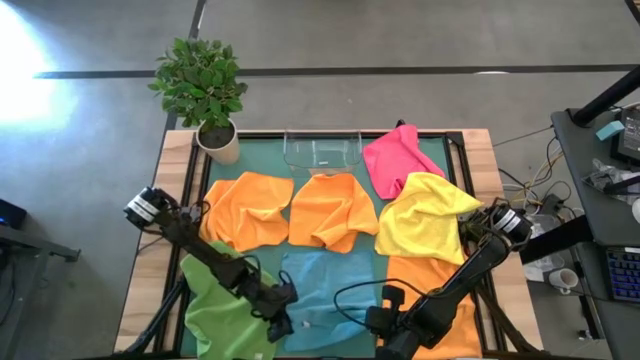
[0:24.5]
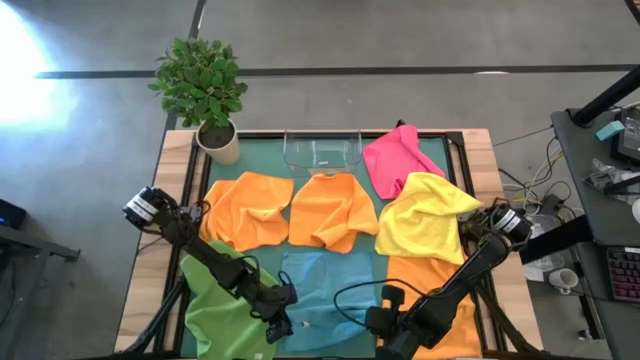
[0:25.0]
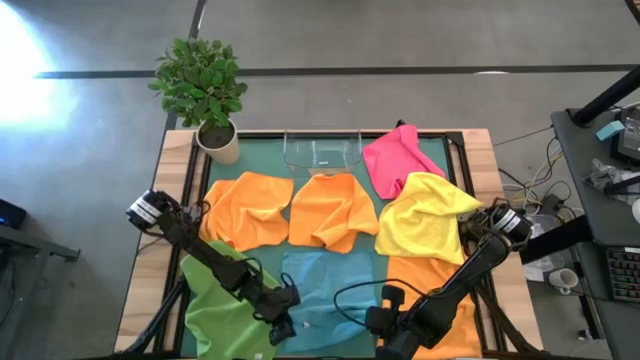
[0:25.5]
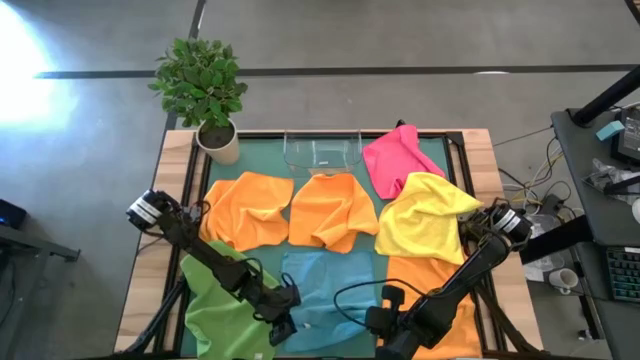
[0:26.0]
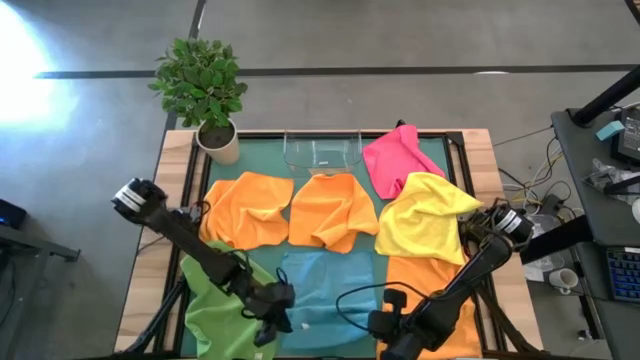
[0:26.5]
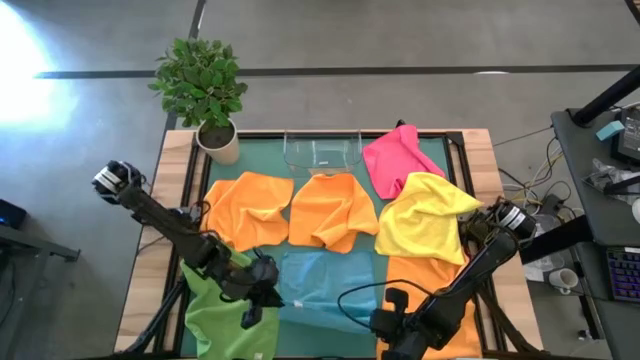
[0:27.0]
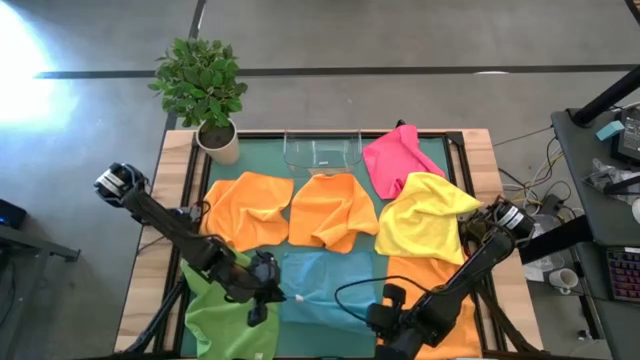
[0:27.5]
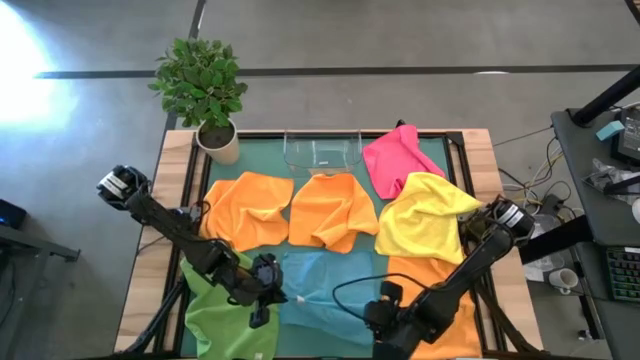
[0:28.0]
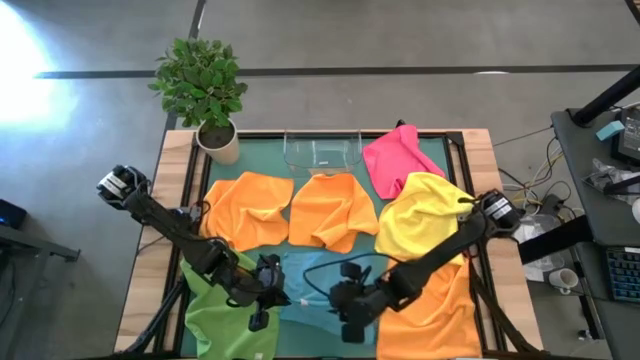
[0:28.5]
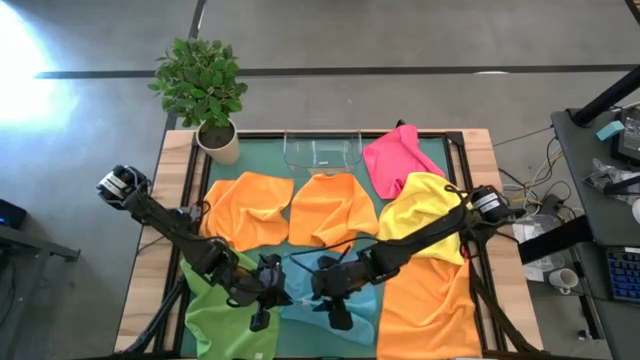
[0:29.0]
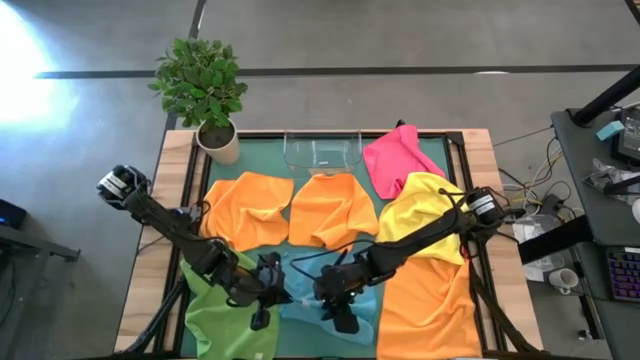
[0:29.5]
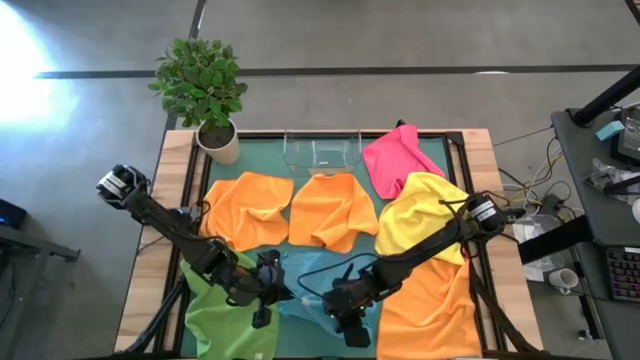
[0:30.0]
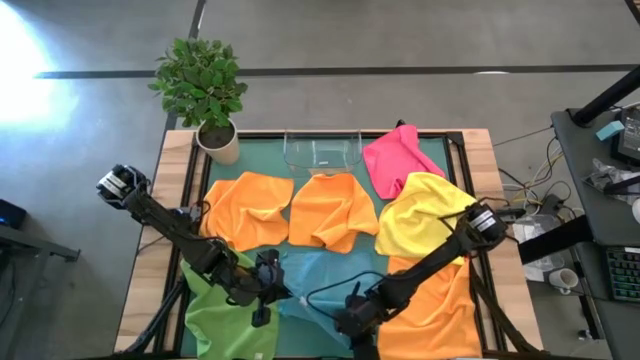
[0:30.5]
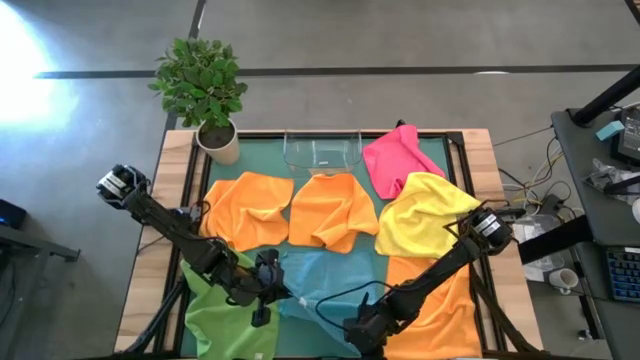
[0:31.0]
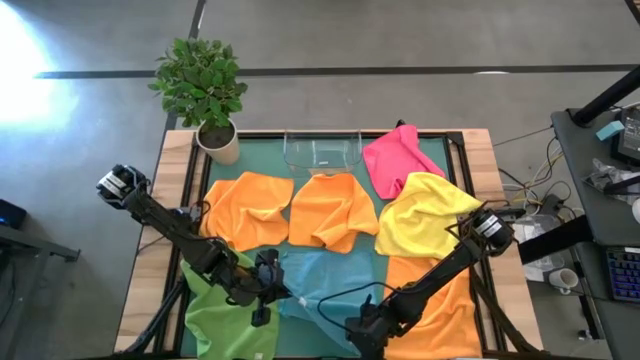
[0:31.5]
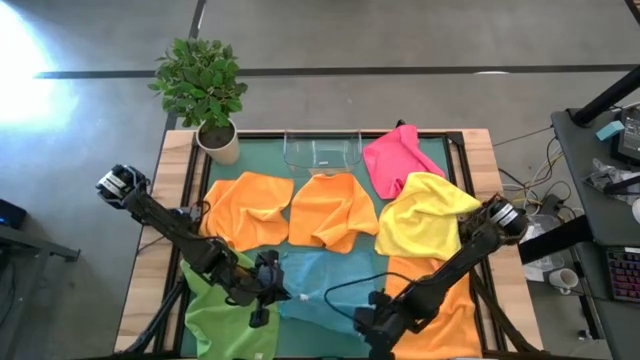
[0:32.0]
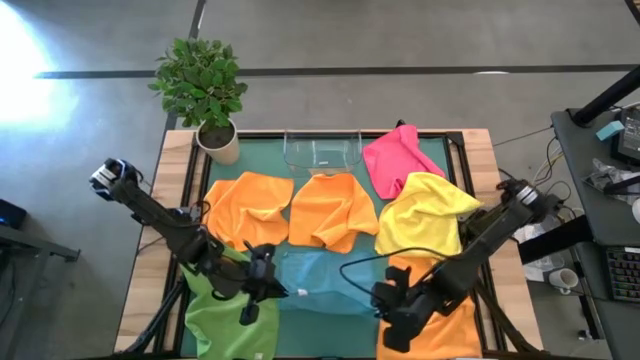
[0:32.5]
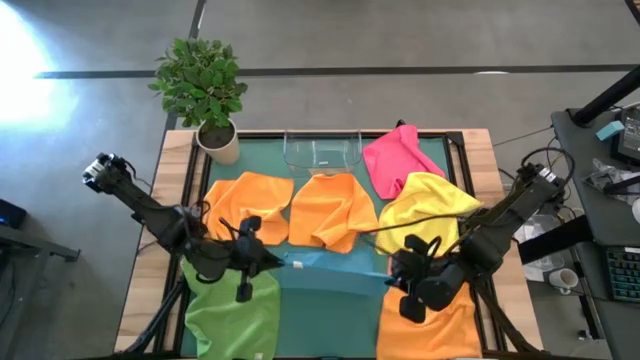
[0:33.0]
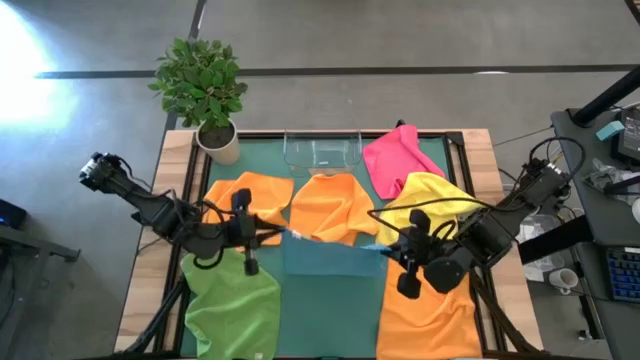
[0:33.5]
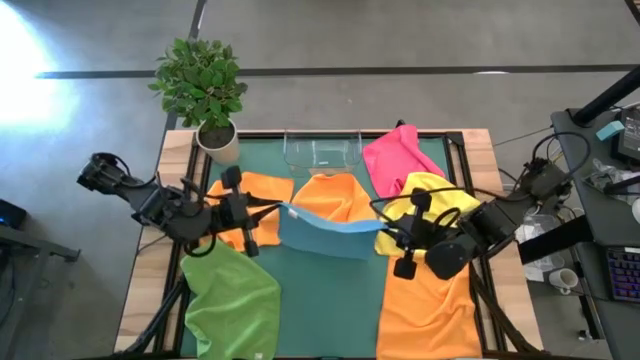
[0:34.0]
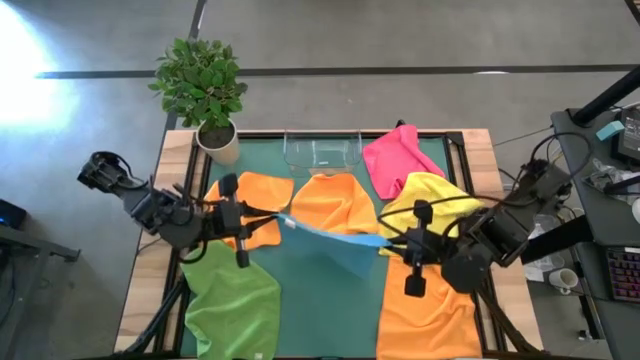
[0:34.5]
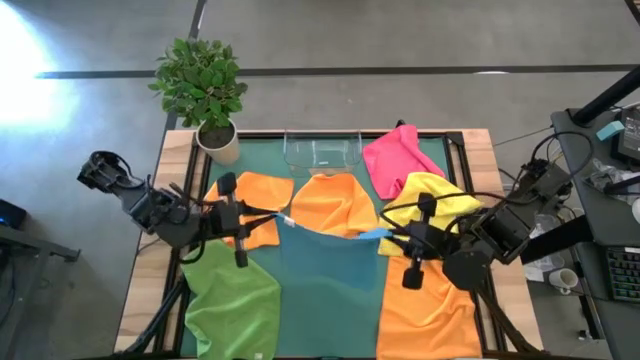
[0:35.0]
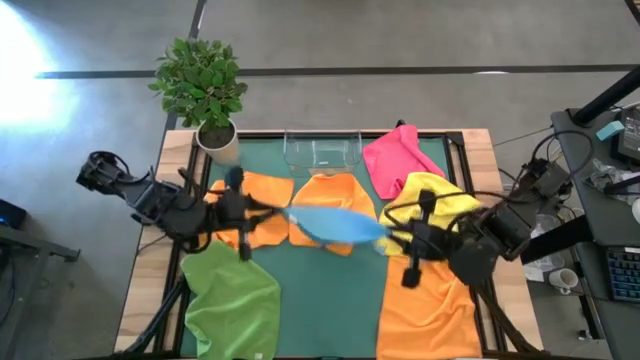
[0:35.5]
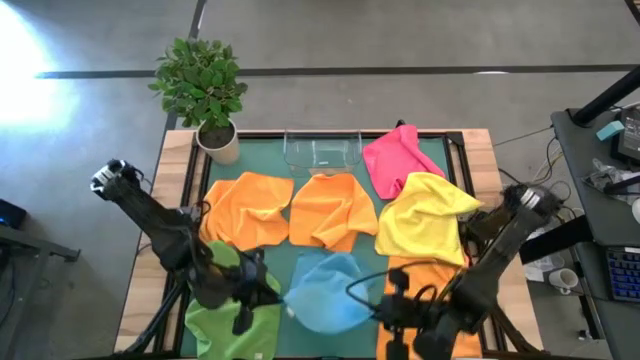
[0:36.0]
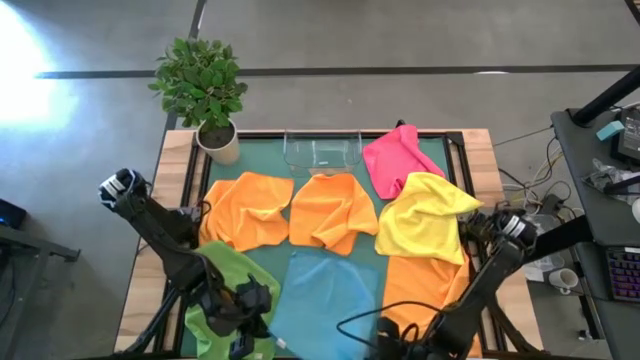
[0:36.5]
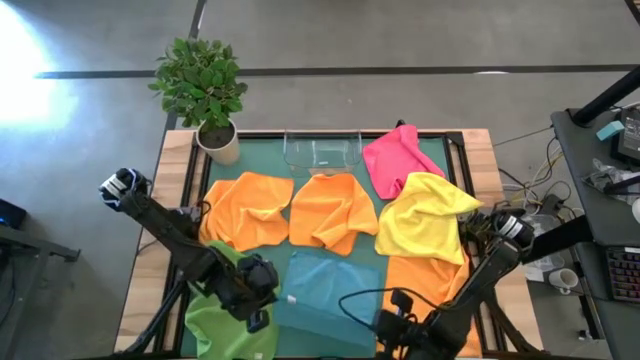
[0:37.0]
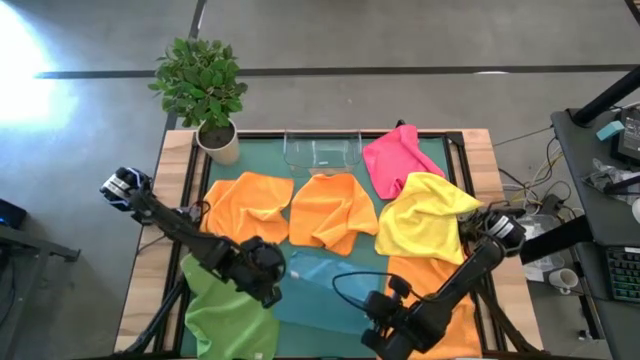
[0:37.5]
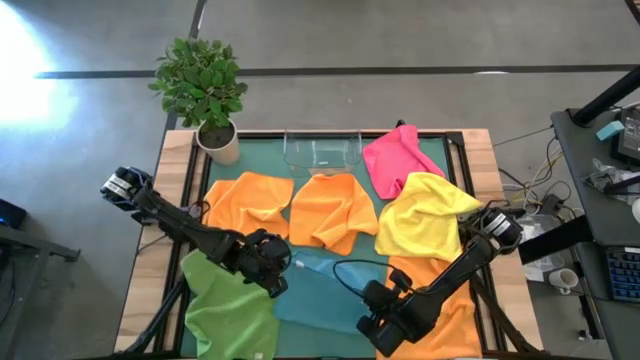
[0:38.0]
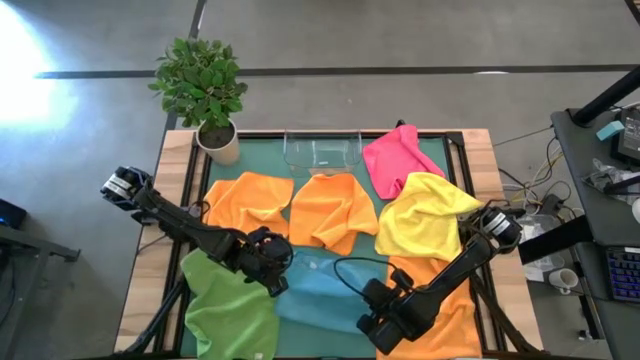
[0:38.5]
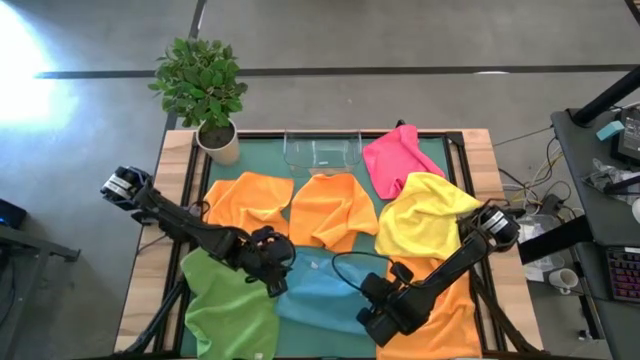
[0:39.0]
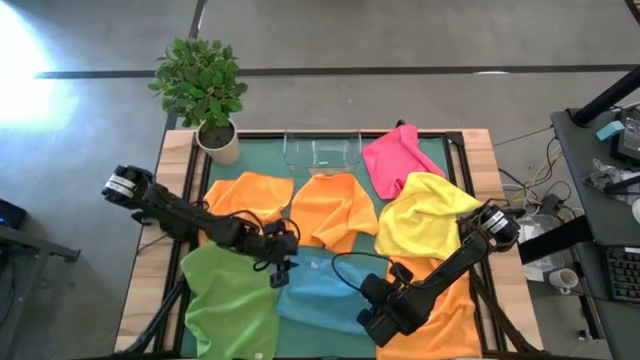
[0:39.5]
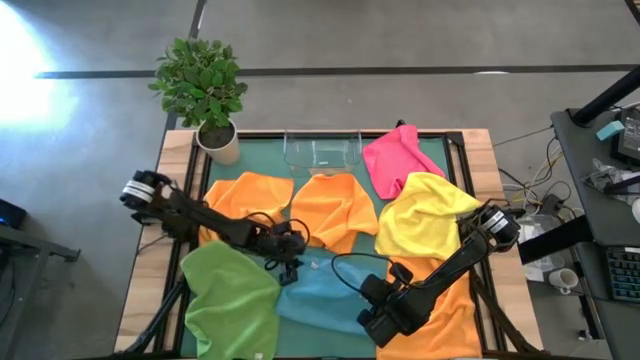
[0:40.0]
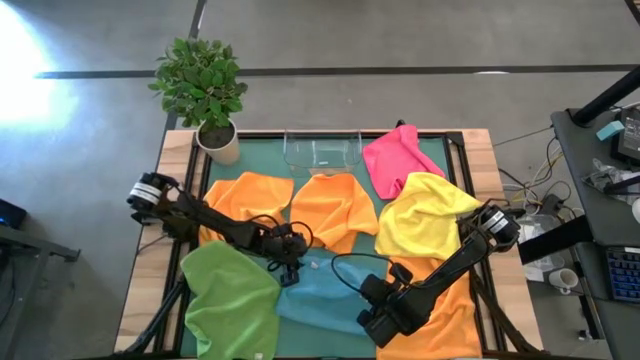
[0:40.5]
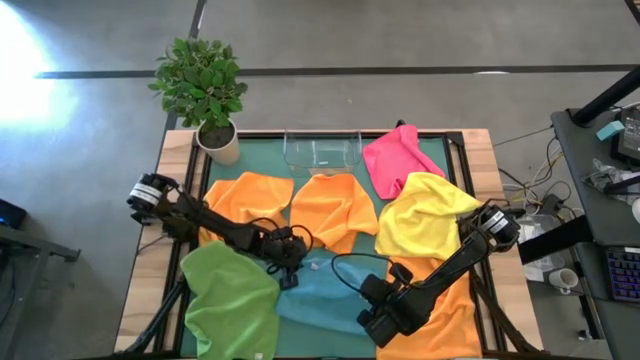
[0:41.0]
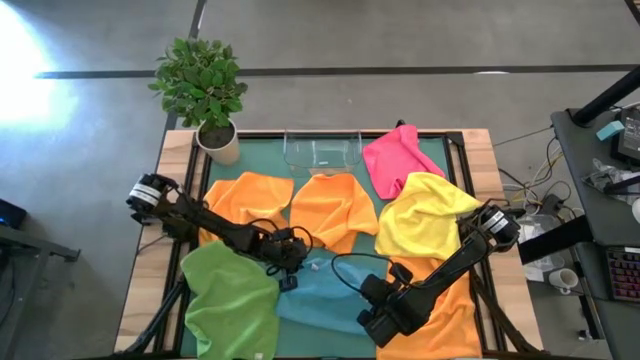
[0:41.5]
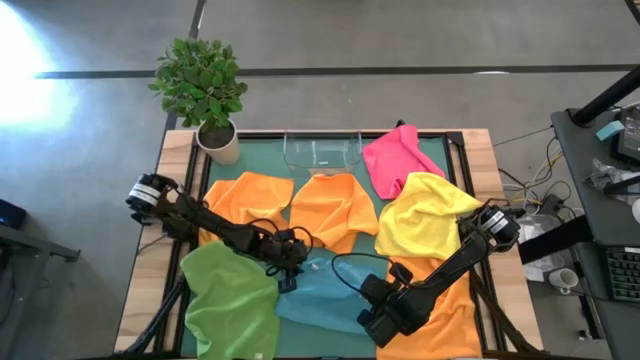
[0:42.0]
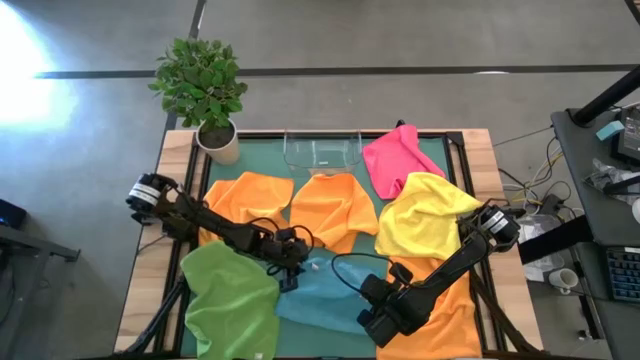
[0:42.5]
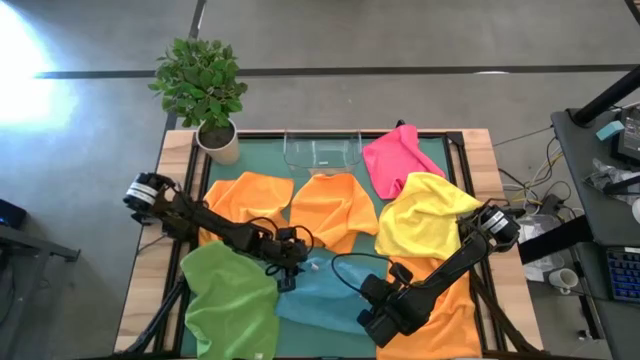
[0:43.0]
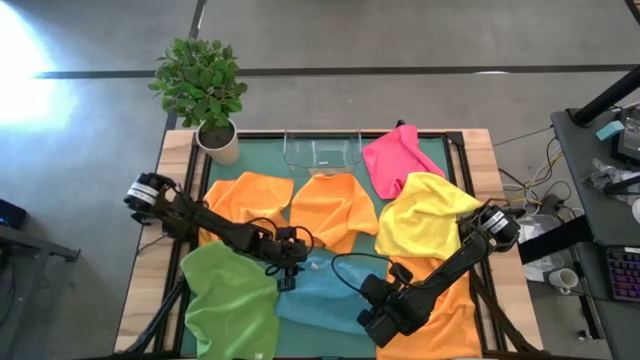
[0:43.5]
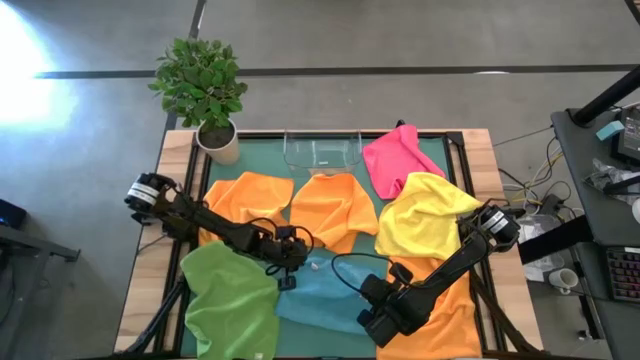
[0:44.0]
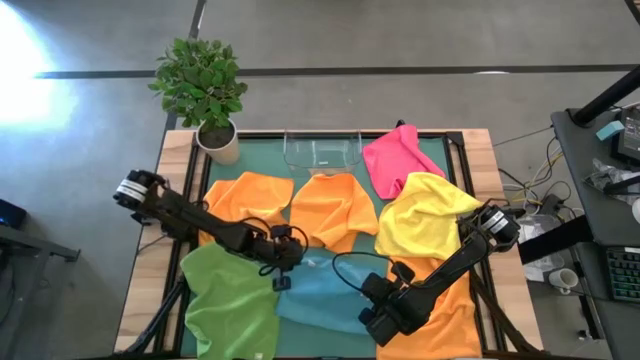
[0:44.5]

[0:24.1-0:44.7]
Task: Fold microfiber towels
Fold the blue microfiber towel
